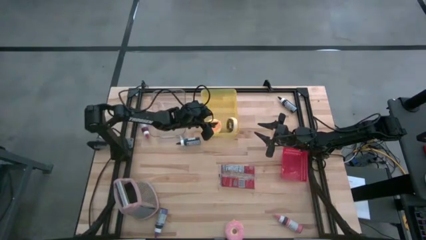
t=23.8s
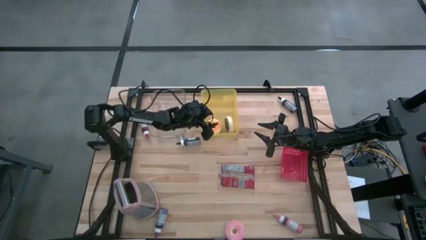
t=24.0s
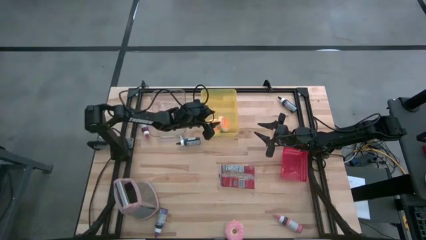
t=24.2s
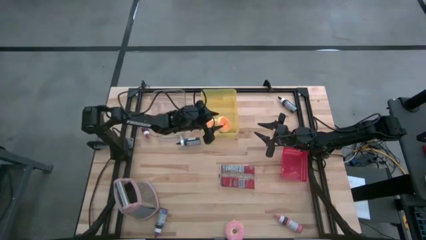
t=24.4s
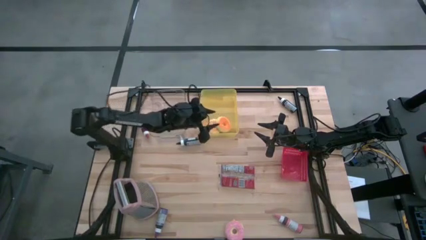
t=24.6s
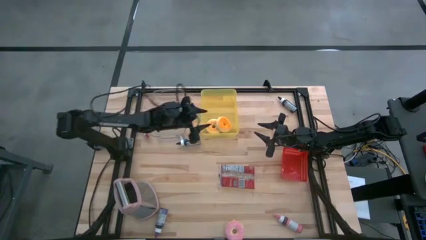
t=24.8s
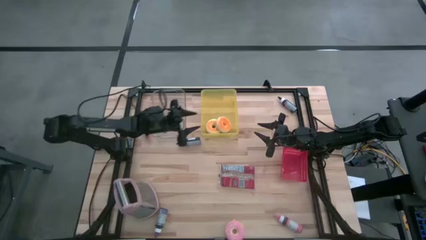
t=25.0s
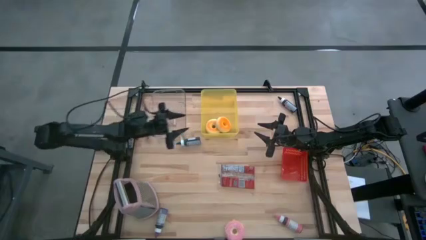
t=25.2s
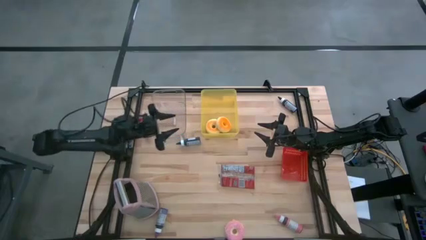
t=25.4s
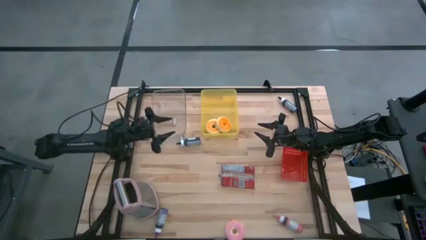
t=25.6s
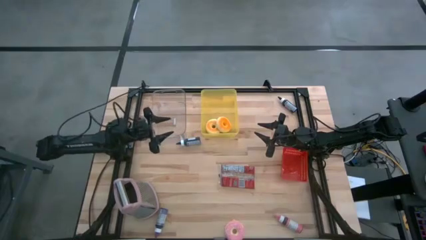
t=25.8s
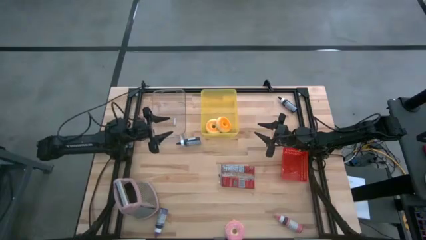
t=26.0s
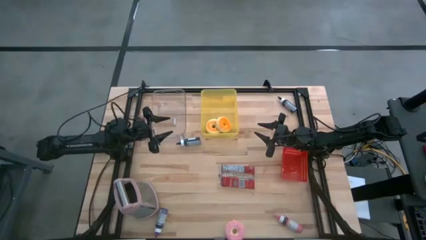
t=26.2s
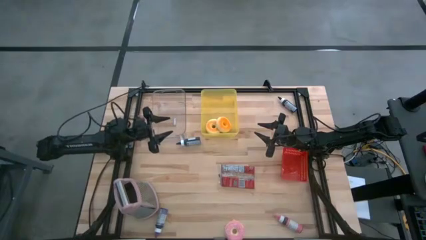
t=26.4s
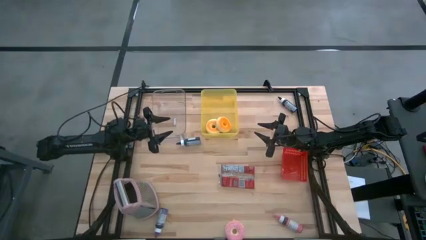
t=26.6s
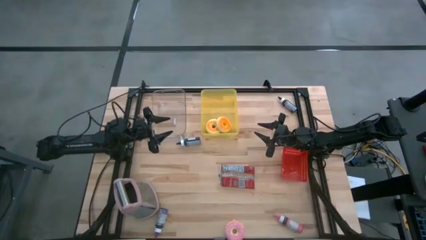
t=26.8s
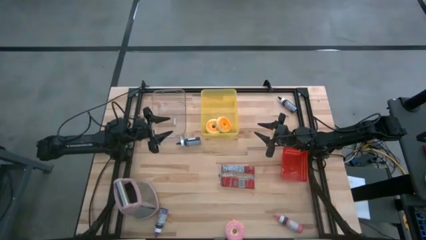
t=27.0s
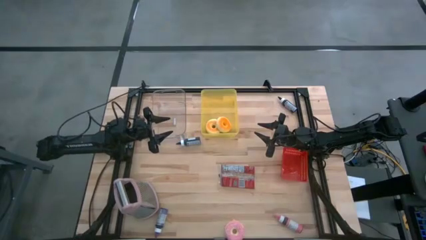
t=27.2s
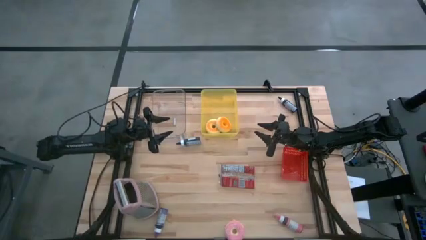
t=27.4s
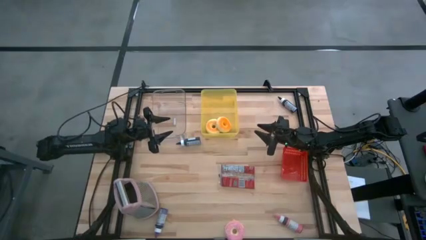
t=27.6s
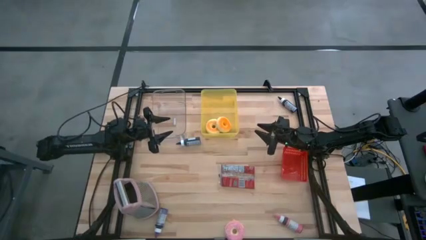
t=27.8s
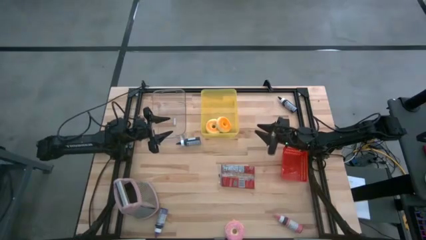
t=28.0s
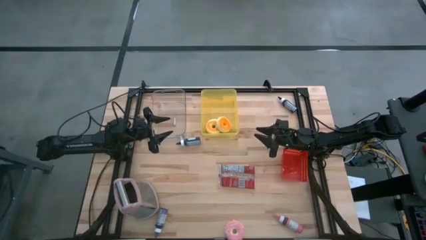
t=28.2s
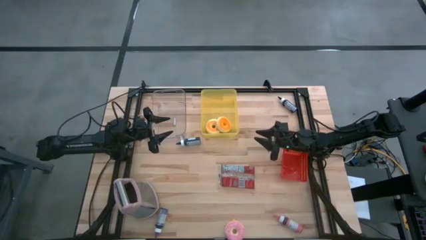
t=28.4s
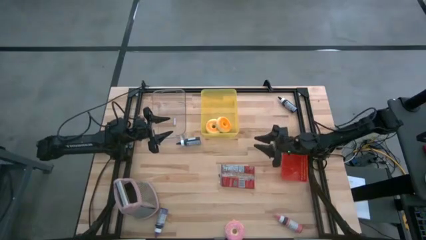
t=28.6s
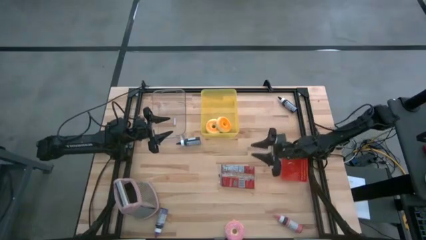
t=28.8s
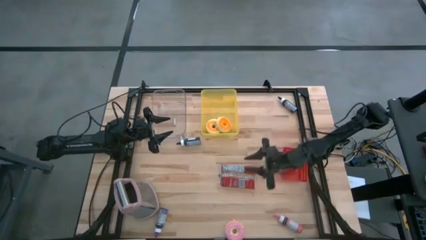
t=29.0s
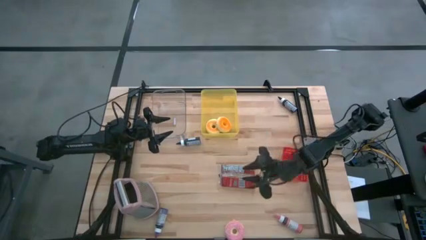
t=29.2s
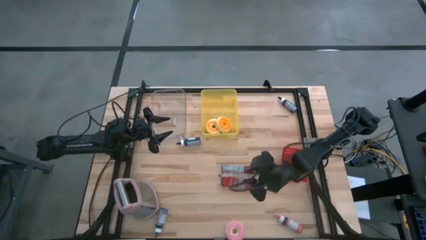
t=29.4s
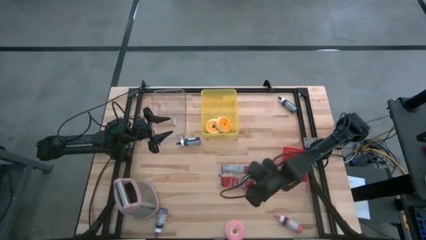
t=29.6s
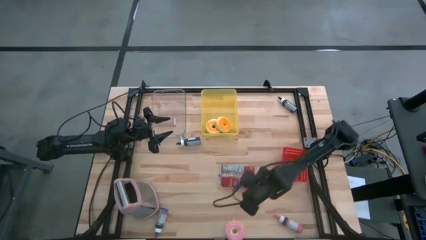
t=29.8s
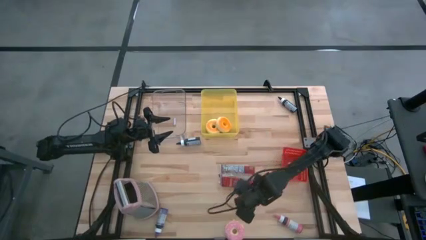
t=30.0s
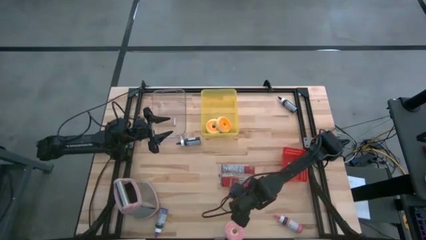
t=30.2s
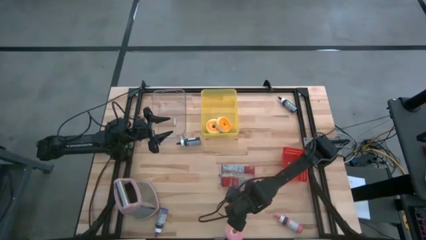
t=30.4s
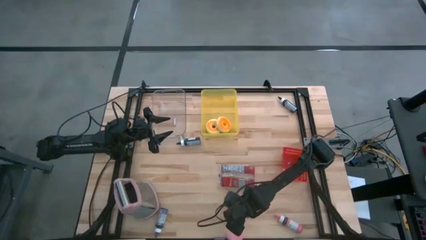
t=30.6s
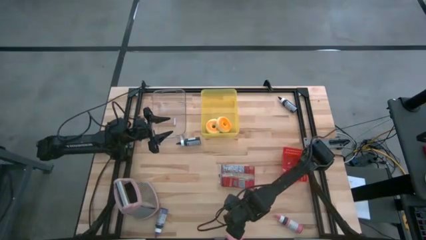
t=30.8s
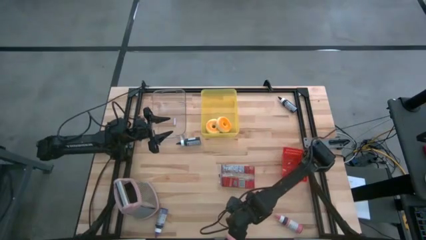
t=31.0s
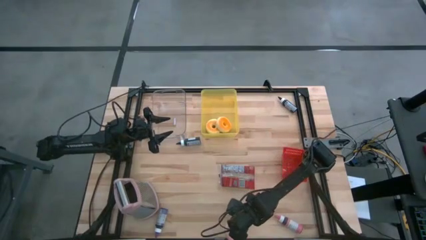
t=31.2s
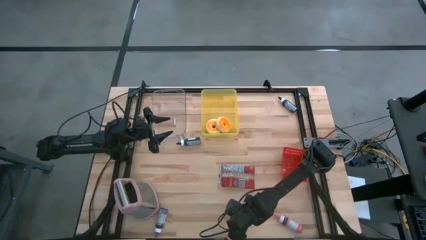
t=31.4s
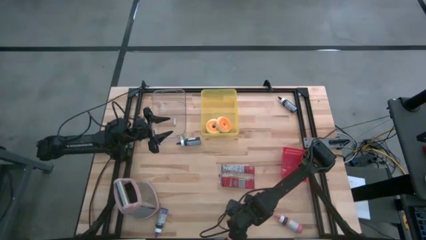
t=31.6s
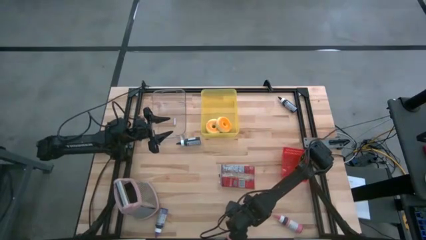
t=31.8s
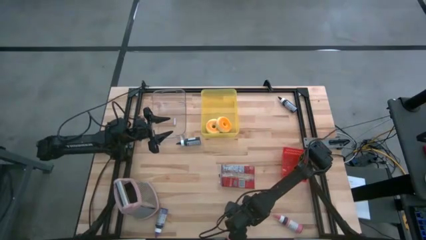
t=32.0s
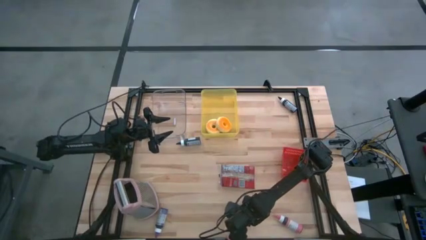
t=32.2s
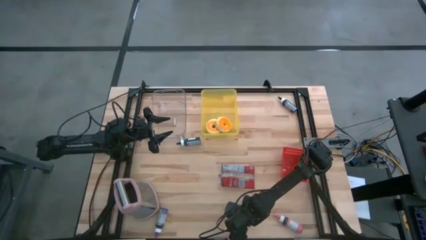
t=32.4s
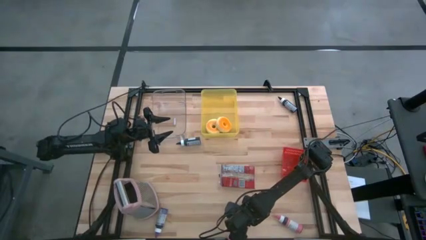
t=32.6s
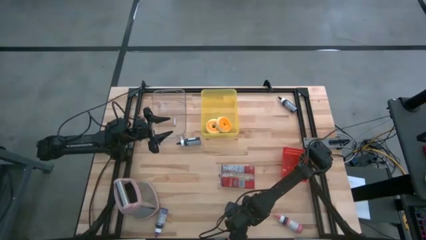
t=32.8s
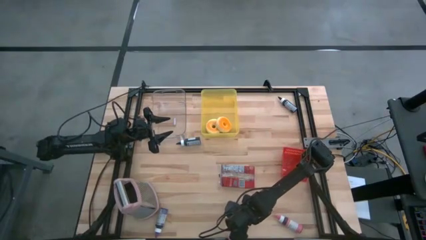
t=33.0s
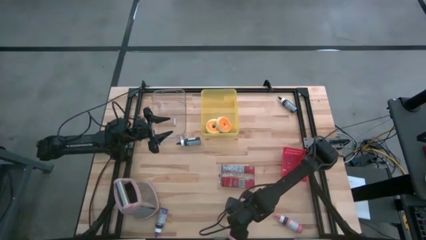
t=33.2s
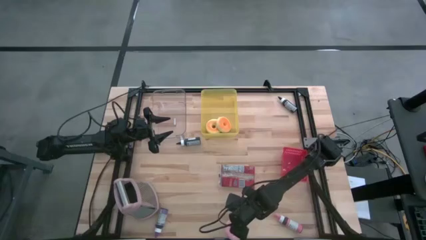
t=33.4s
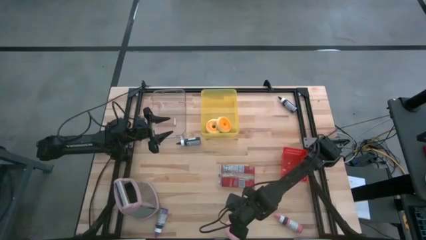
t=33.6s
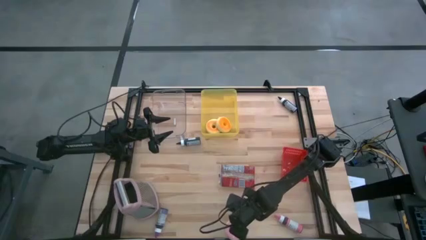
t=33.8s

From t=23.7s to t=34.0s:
Task: Pick & Place Food Item
Put the pink donut into the yellow bin
